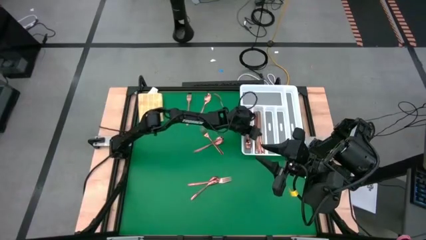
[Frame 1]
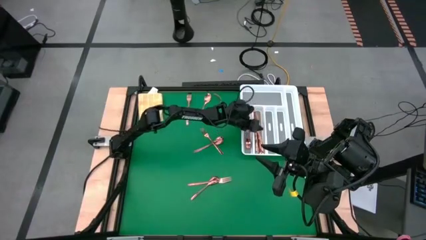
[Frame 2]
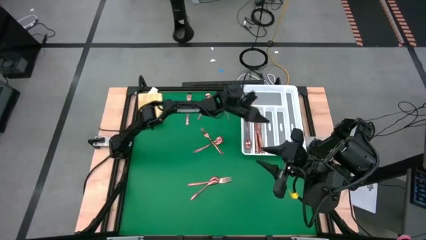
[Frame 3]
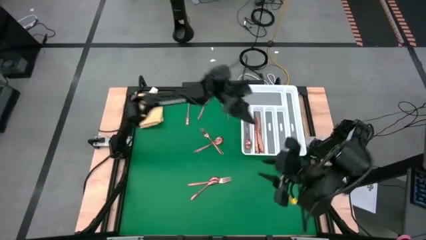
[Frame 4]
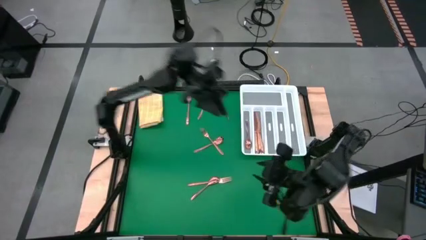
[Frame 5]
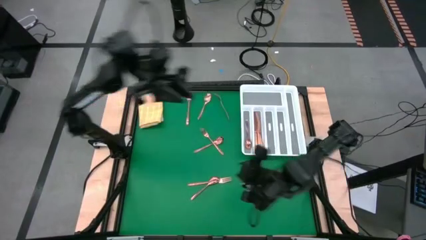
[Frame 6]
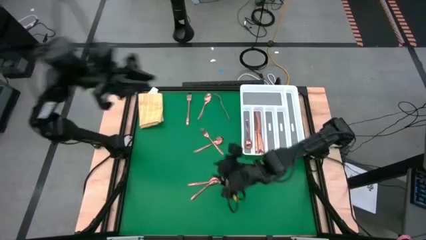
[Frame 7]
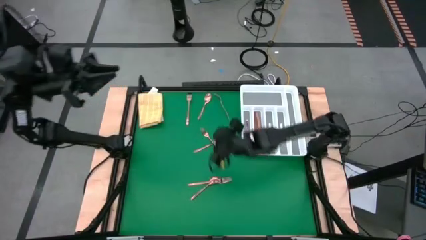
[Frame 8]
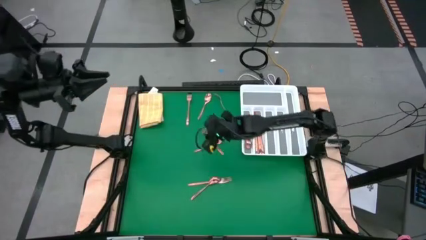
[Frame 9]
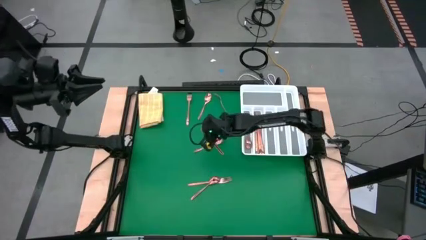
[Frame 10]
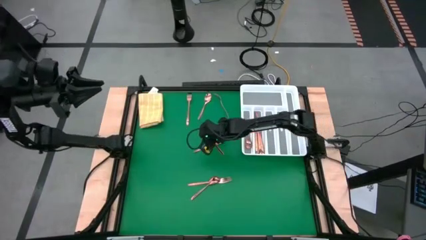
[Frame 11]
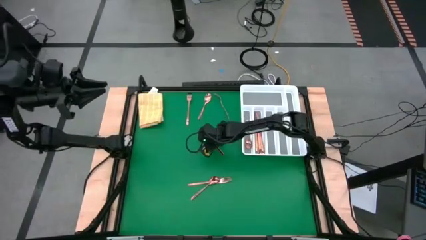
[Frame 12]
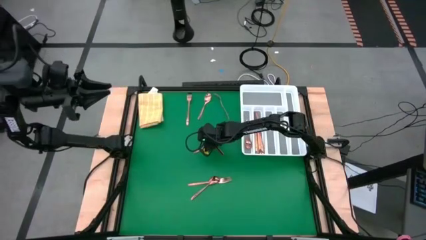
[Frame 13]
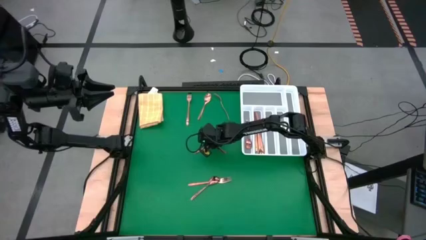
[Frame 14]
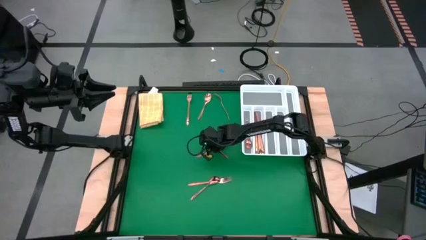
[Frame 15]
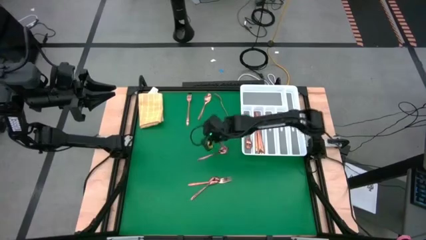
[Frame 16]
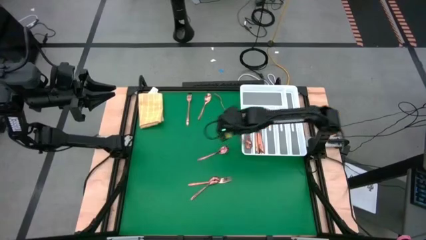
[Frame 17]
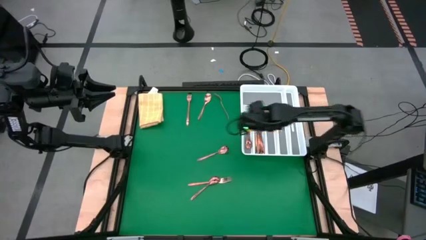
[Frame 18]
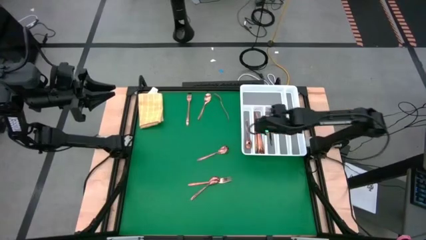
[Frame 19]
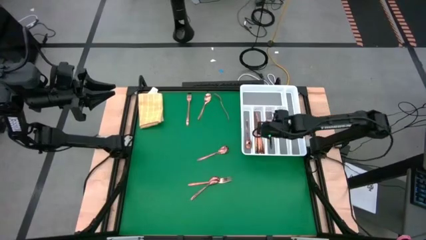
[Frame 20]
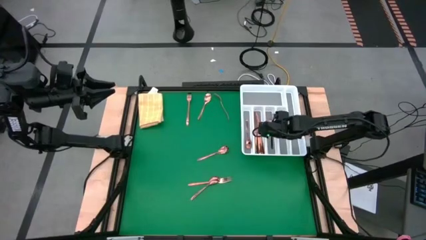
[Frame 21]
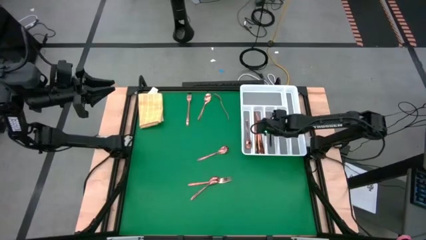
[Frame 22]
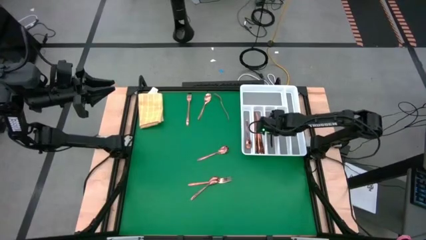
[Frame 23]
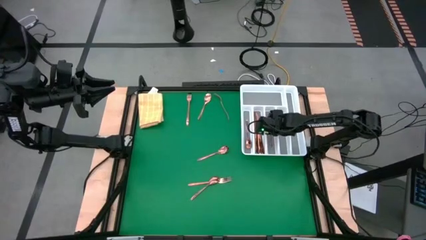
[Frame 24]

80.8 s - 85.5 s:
Task: Sort silverware
Put the center gold fork into the silverware organizer

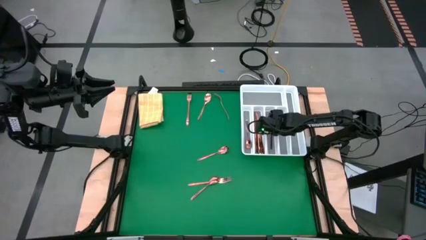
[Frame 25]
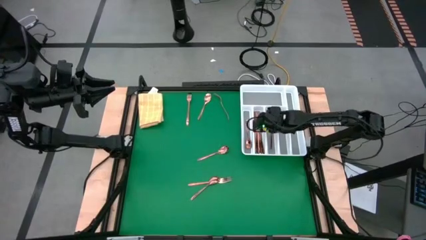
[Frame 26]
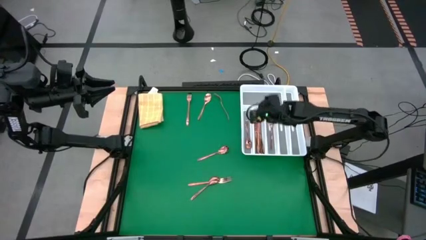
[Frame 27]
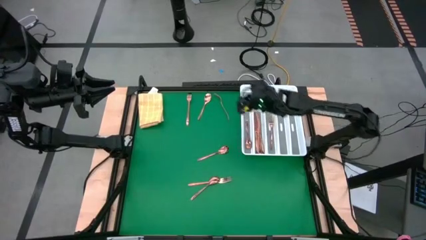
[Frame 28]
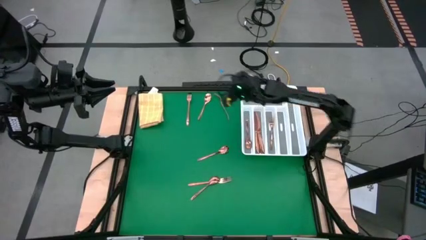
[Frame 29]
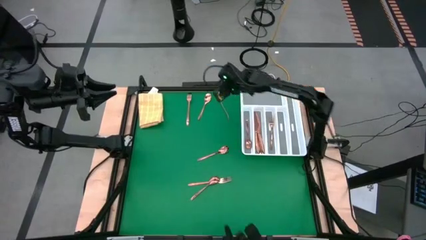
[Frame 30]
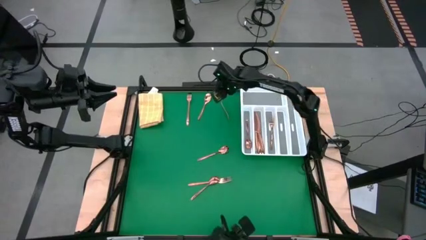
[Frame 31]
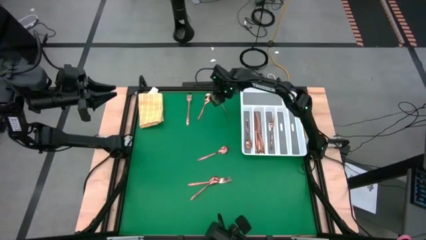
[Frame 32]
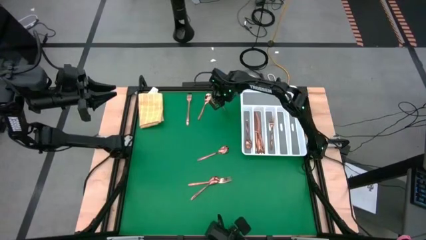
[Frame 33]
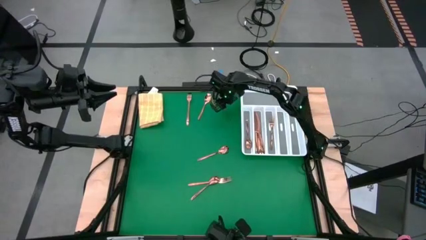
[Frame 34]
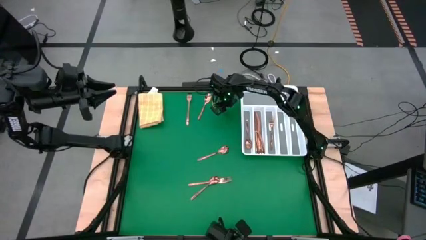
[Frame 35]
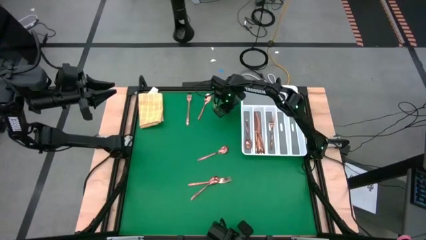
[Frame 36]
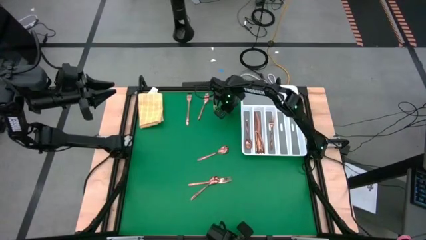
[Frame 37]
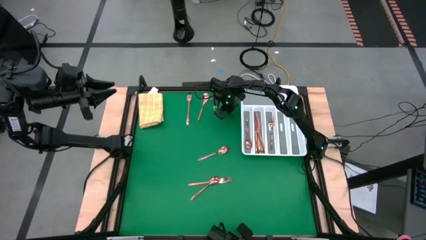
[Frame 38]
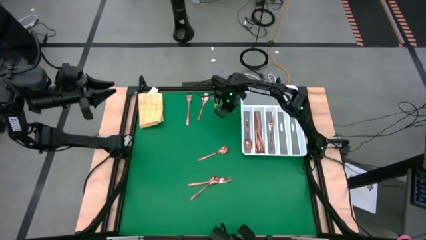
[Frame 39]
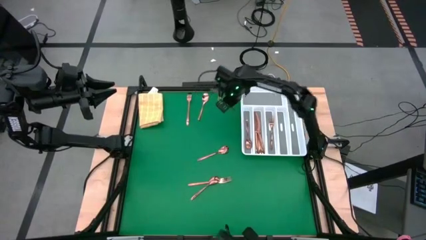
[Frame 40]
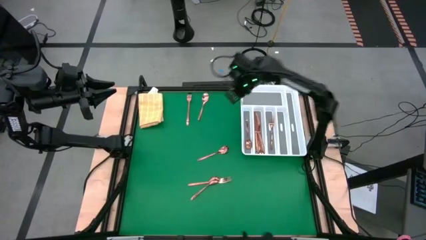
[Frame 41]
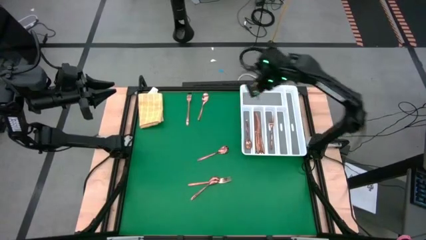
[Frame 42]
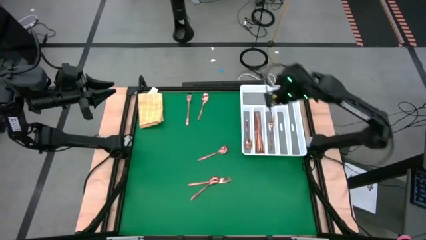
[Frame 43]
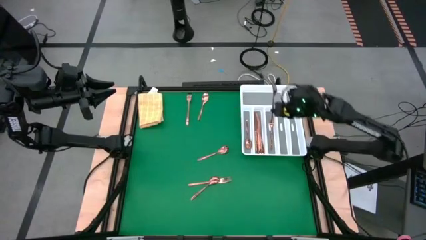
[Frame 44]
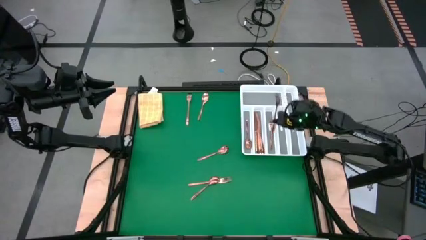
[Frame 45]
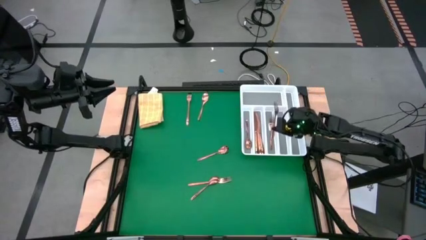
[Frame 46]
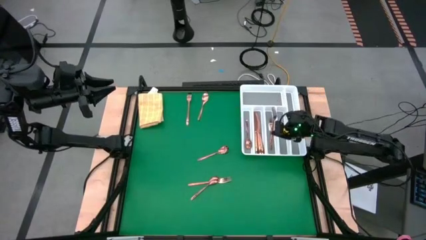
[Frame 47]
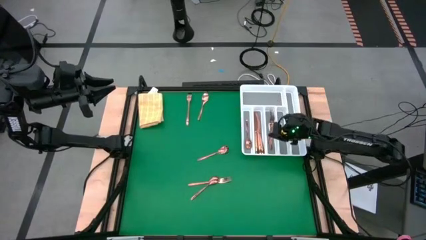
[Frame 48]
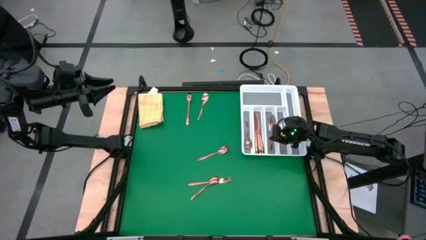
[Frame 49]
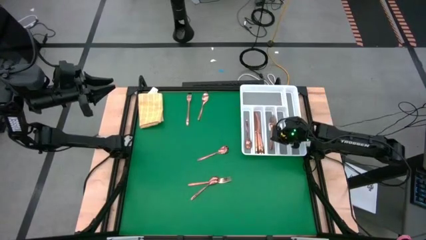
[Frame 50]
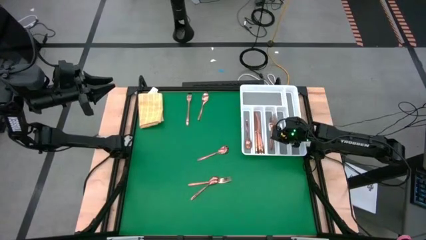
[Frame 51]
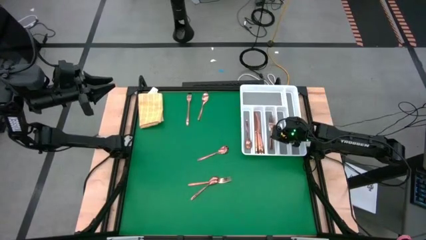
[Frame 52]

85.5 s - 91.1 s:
Put the top right gold fork into the silverware organizer

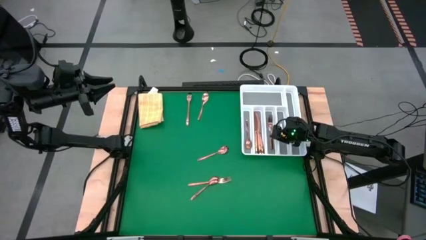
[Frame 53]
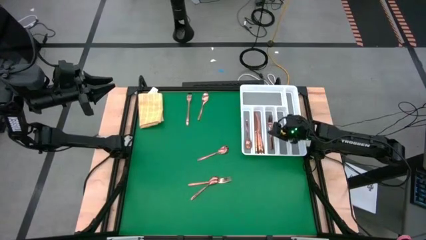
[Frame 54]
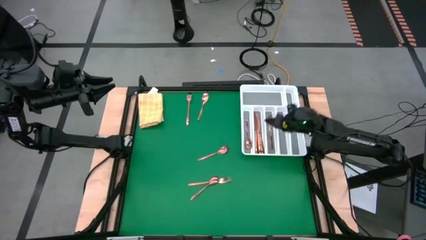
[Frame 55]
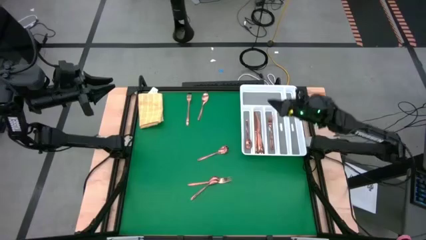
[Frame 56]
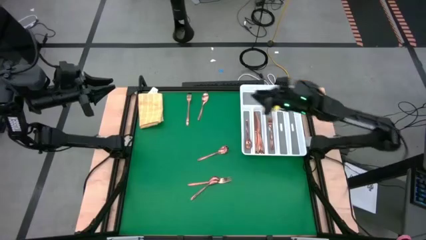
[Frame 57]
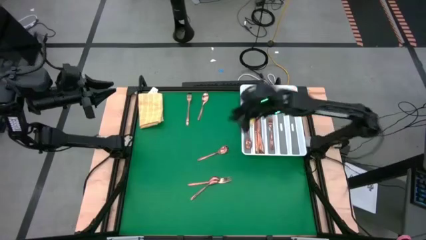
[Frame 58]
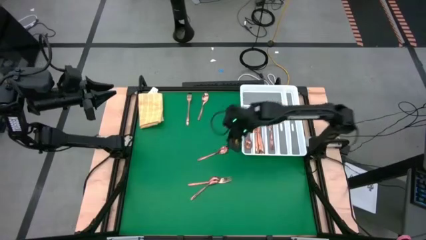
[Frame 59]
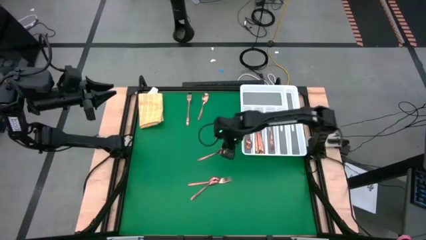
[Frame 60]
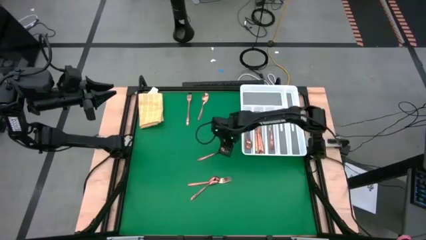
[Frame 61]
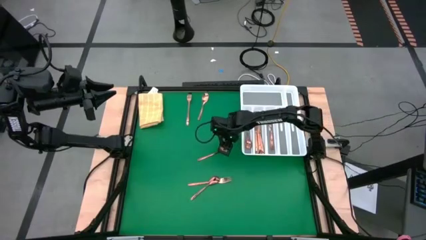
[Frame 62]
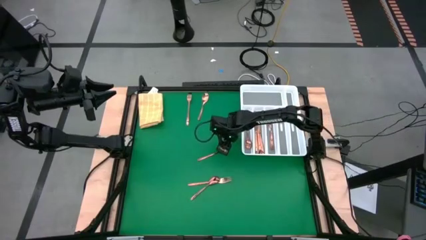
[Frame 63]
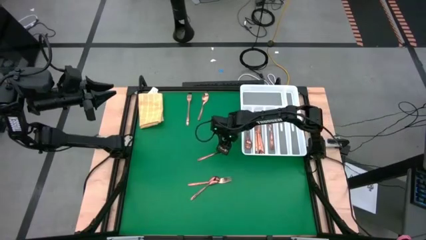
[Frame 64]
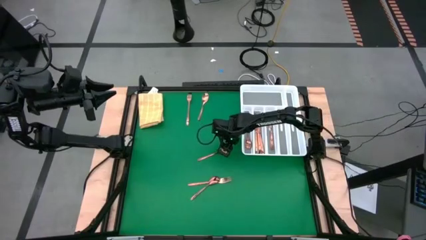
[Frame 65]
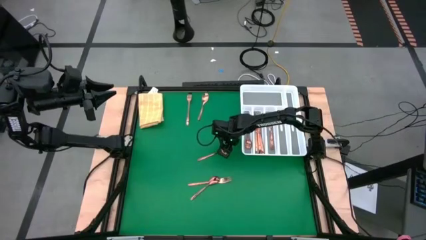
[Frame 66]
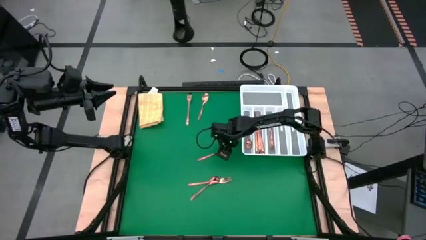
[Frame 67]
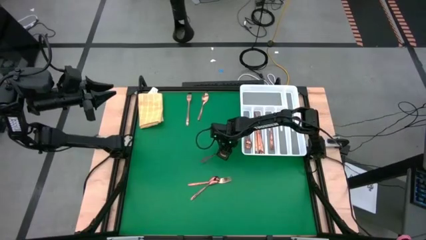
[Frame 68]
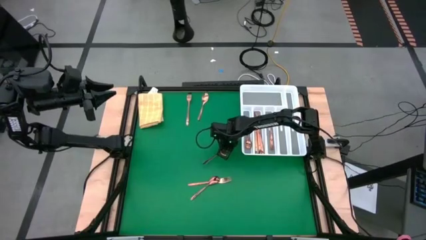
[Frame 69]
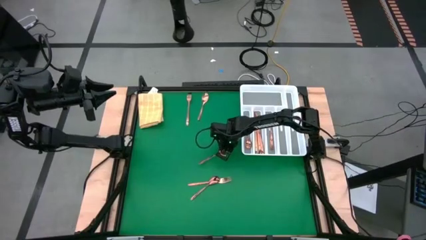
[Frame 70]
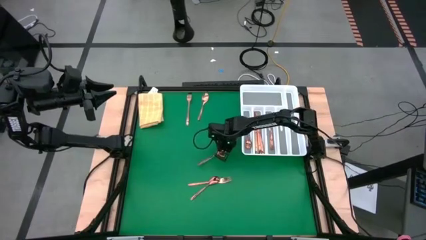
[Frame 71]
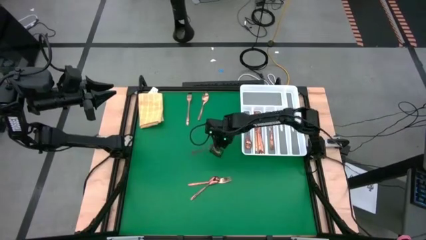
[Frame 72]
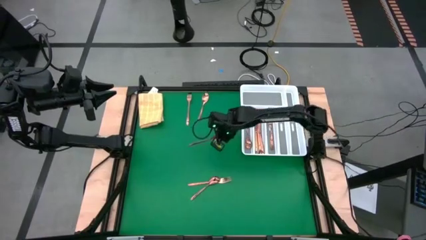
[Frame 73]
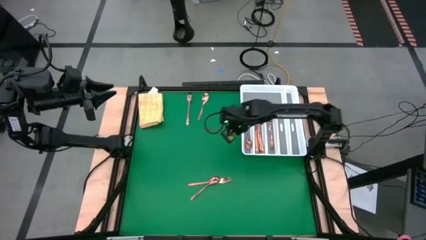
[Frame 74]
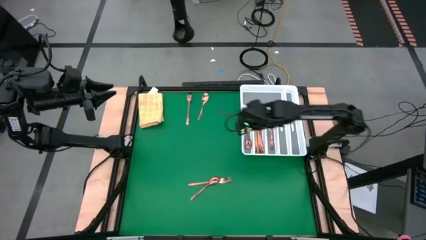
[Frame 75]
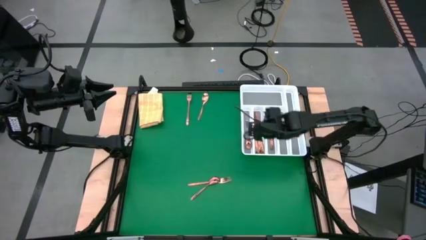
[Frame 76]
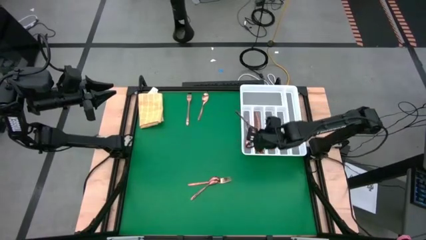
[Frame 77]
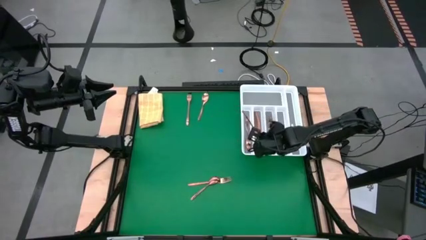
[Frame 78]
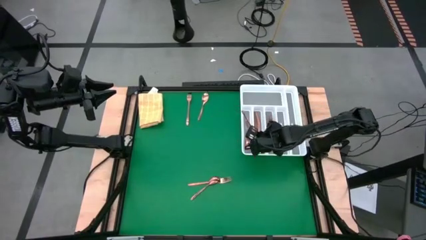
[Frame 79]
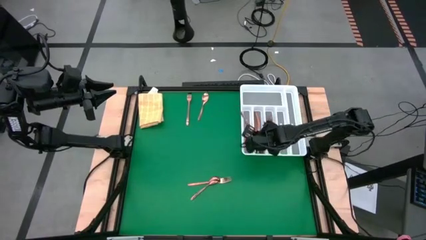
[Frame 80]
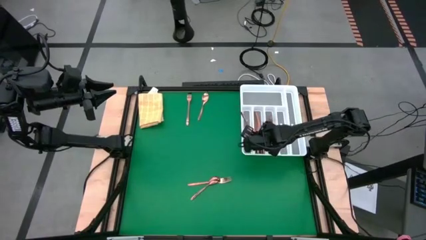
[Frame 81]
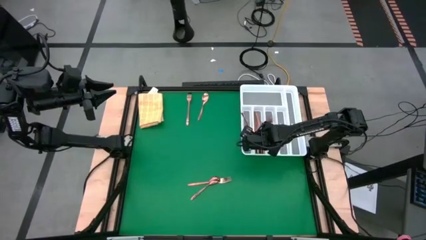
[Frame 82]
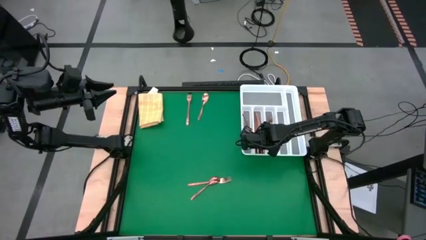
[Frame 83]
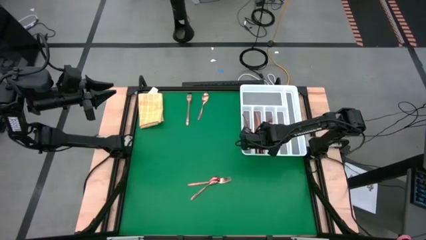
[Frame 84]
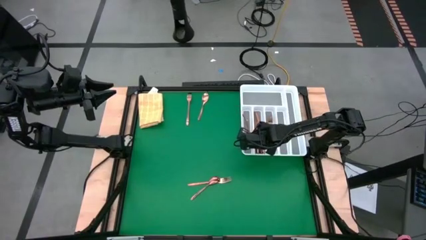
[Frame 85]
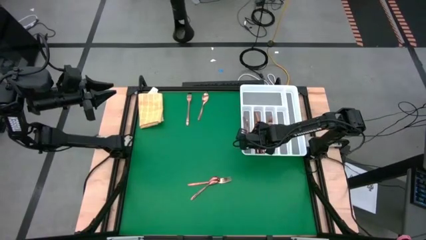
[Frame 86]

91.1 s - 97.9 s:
Put the center gold spoon into the silverware organizer
